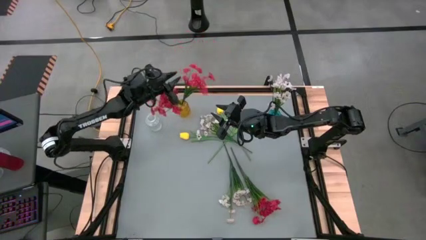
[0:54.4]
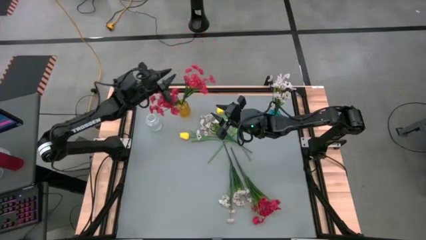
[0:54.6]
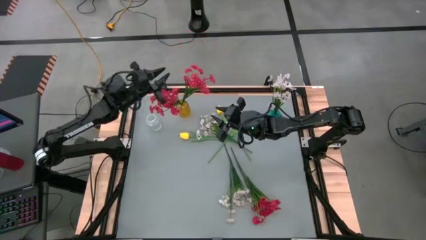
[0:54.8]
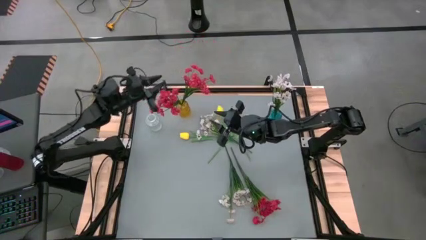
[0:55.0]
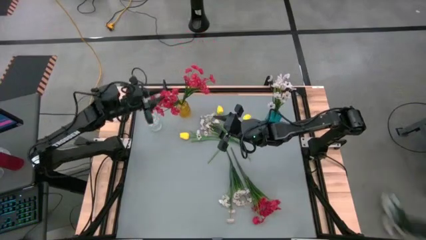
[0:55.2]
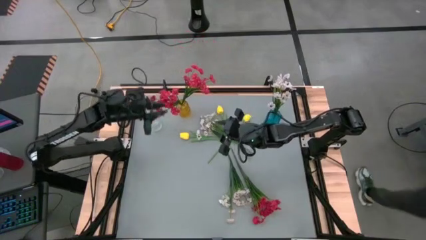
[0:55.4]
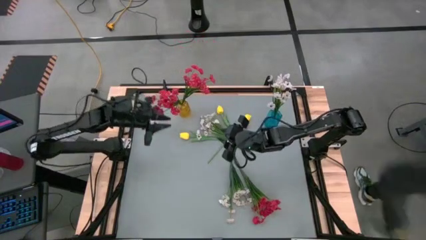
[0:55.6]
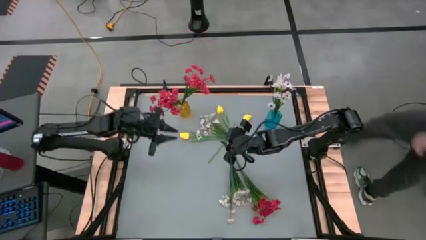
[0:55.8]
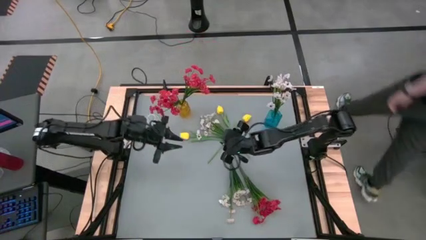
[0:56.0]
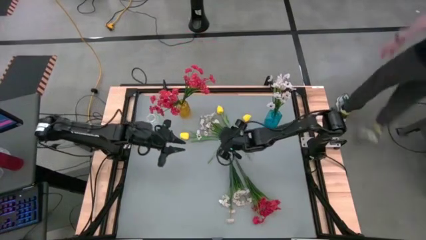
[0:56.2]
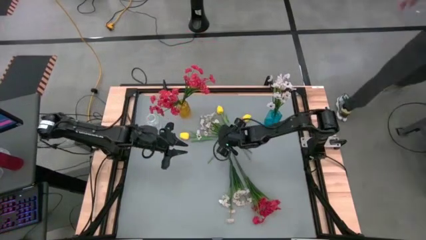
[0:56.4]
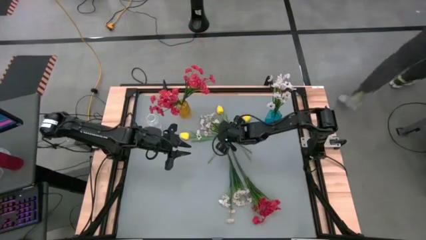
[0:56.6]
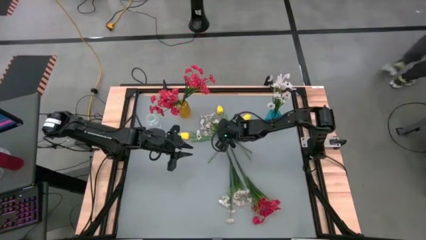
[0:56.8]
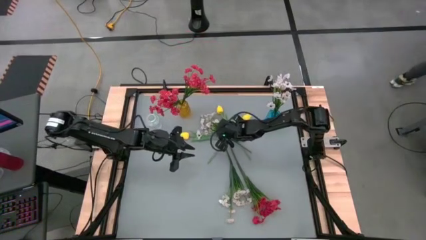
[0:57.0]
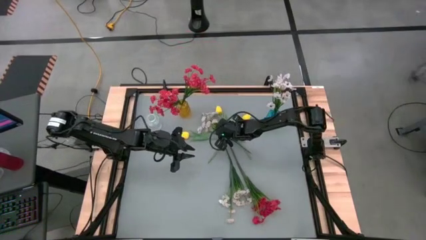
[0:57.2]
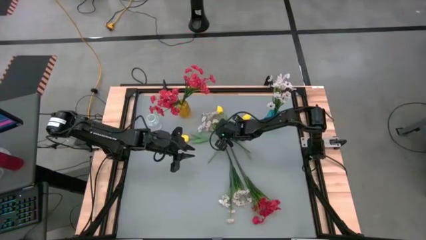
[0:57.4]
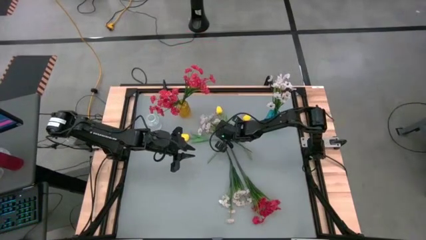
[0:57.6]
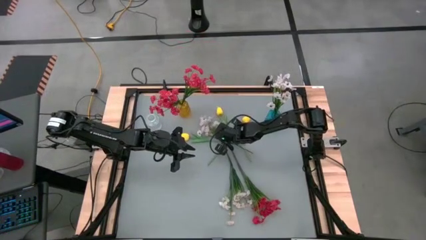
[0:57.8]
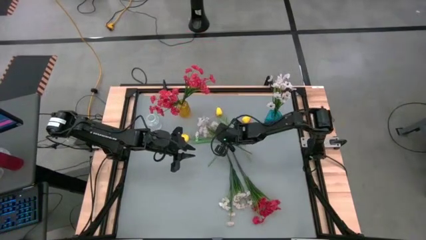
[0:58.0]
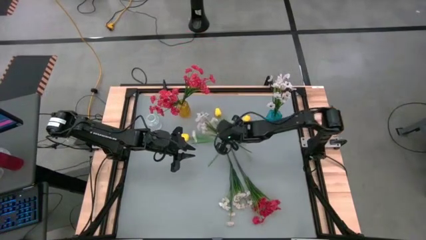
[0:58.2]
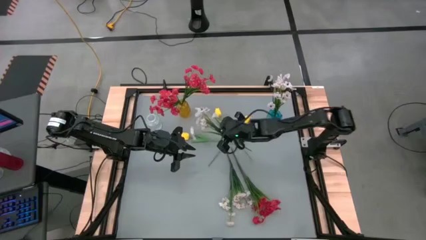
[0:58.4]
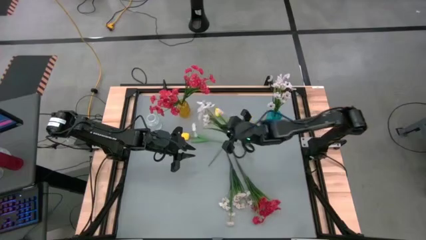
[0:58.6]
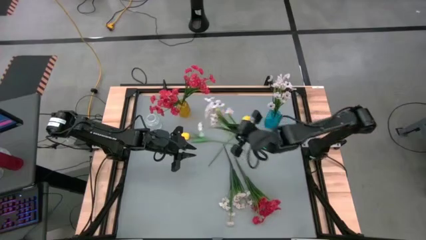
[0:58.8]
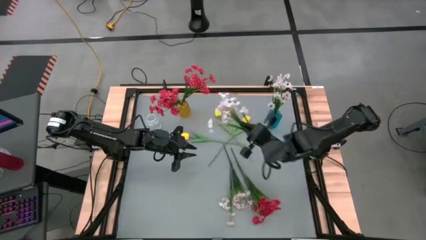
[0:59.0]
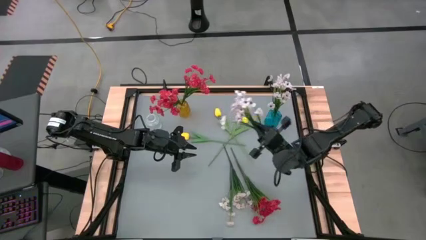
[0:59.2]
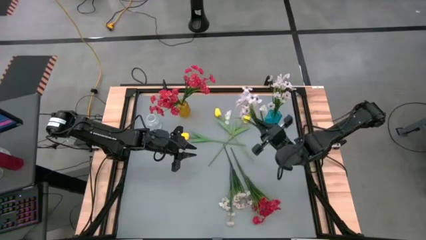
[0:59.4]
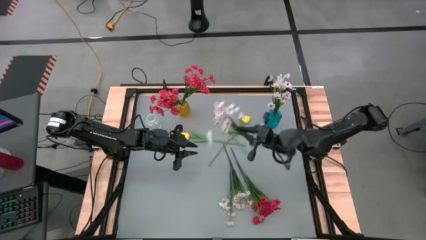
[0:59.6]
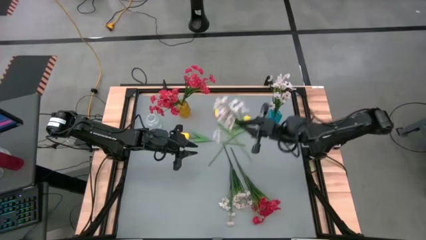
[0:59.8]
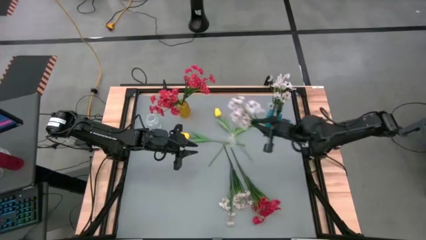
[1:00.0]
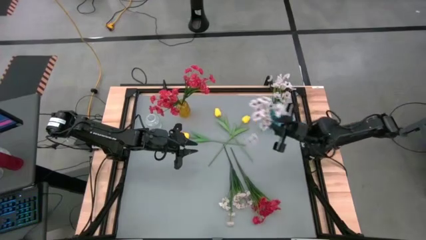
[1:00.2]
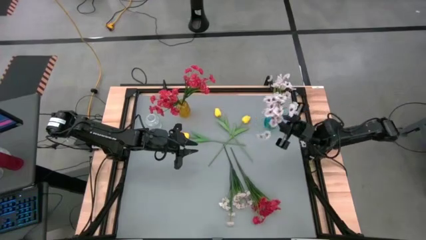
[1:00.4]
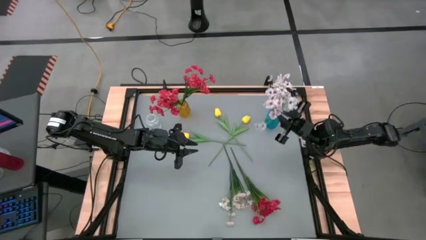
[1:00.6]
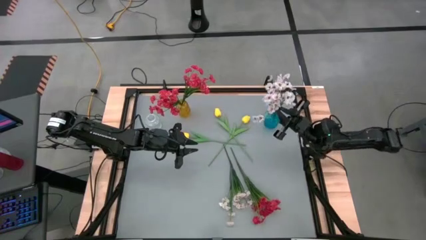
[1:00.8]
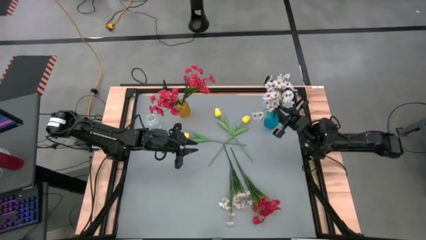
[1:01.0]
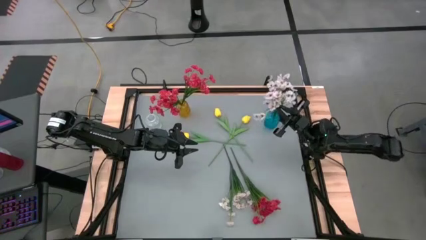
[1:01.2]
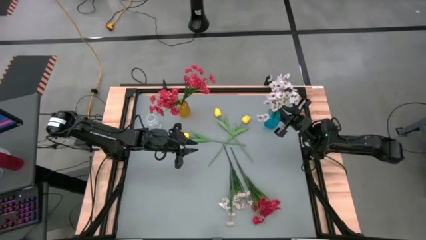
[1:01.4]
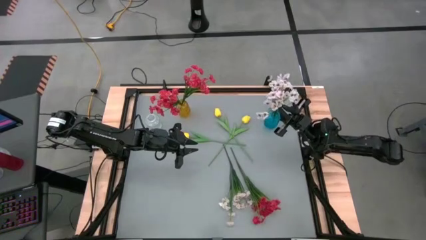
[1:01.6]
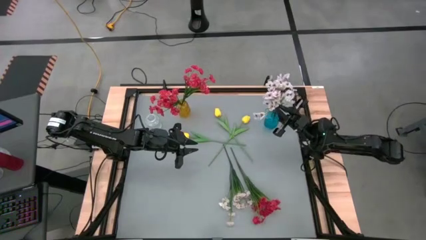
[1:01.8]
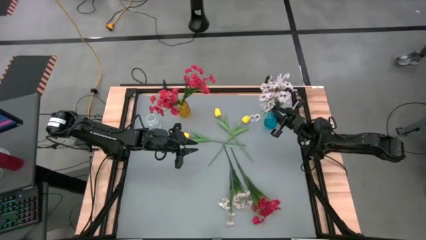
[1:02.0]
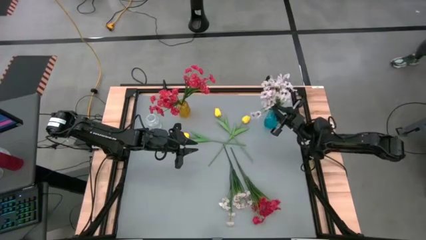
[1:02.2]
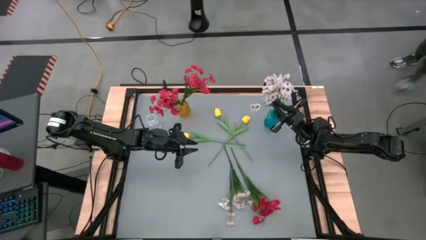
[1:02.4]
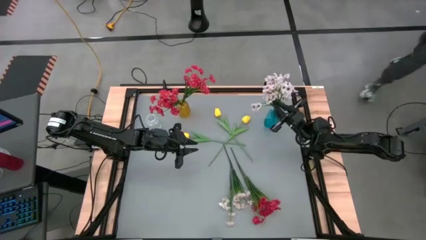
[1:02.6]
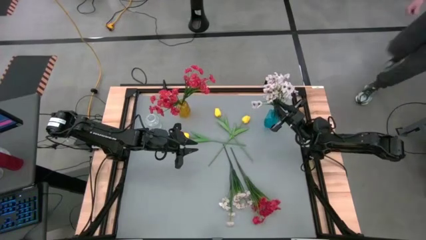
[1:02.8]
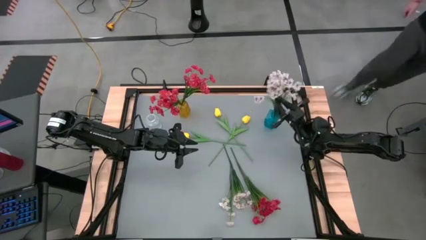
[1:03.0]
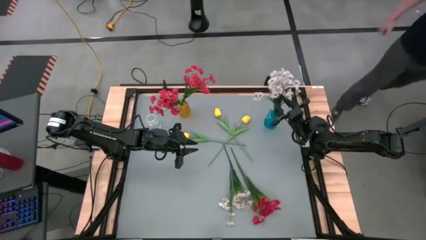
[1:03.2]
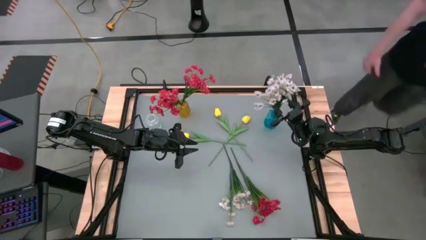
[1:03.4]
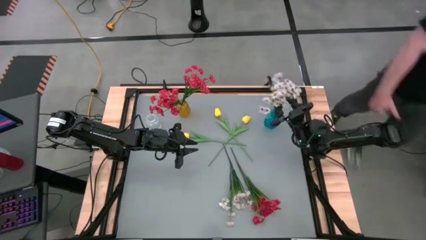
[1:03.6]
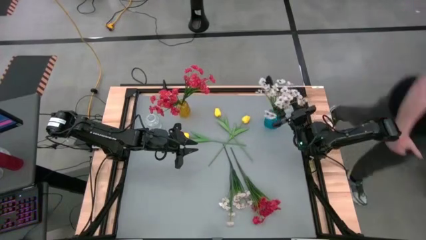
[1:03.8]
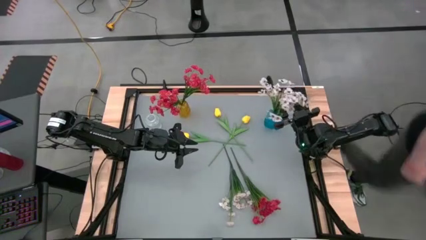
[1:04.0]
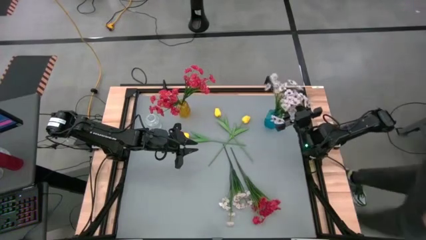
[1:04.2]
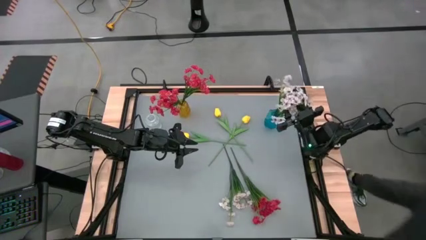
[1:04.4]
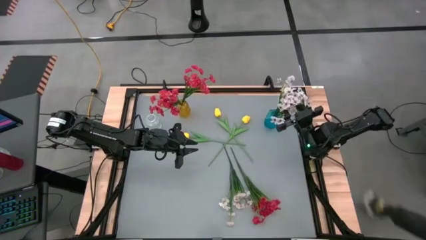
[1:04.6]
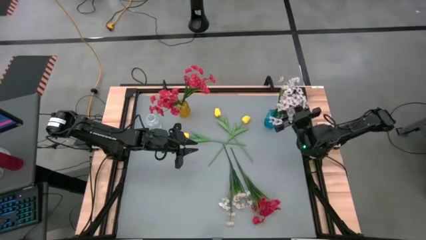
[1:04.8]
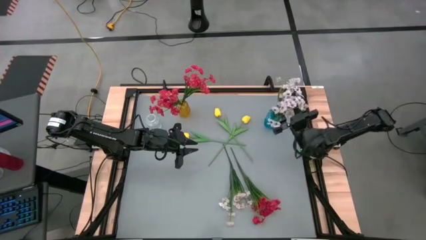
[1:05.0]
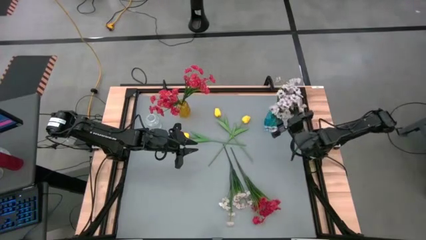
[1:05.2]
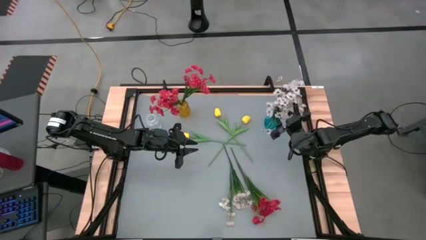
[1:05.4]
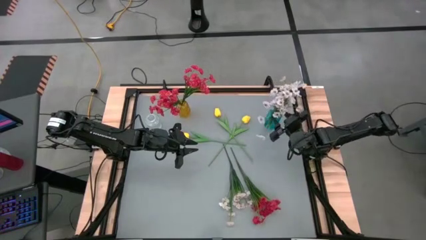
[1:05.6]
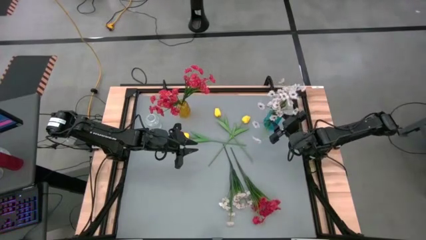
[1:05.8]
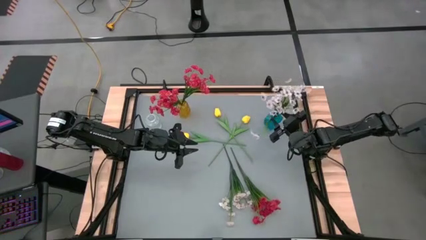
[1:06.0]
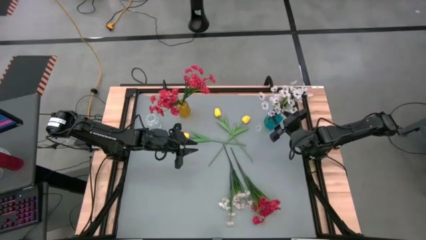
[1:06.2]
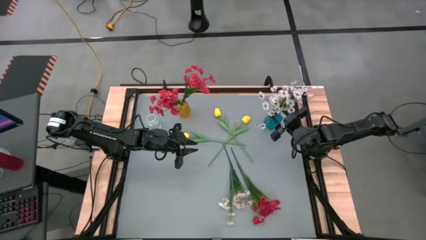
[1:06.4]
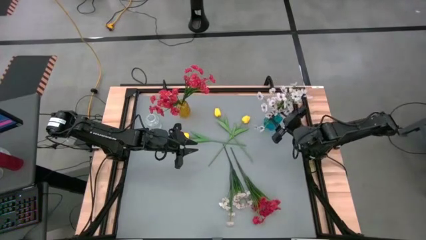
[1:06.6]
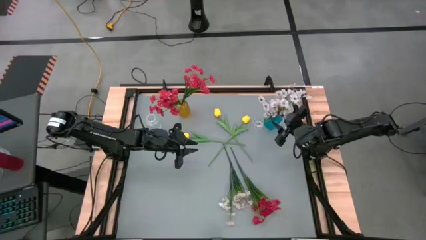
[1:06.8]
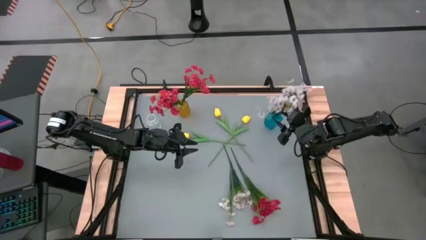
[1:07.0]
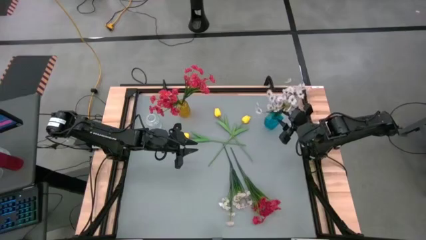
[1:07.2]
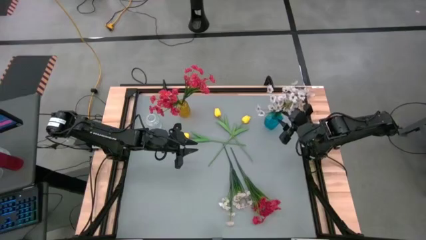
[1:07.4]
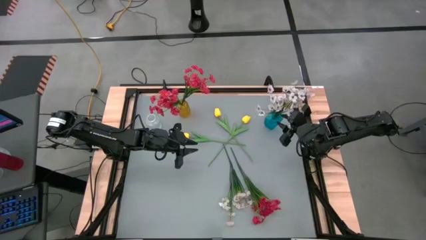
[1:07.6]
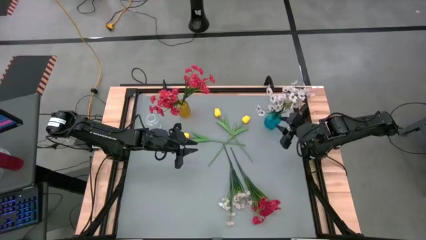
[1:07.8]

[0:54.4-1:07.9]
Task: Sort flowers into vase by color
Put the top white flowers into the blue vase

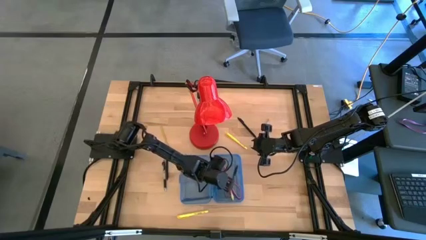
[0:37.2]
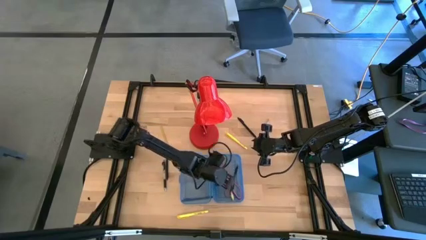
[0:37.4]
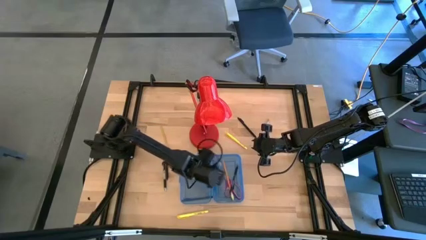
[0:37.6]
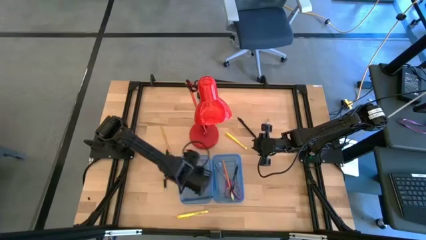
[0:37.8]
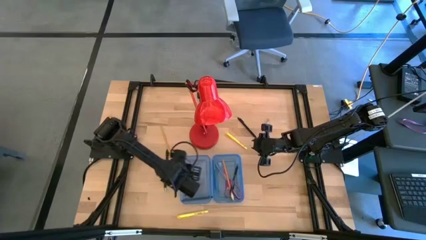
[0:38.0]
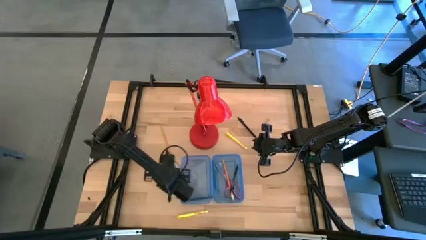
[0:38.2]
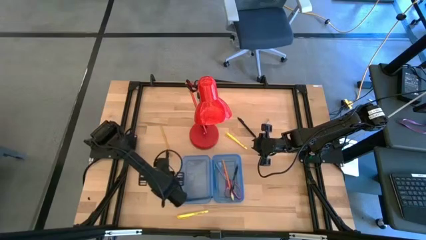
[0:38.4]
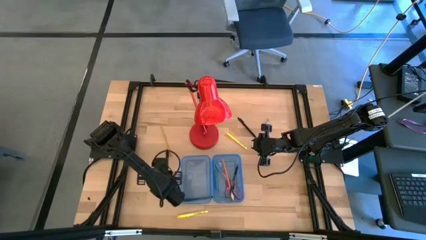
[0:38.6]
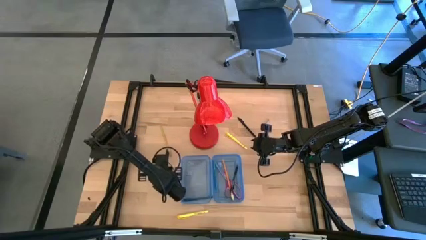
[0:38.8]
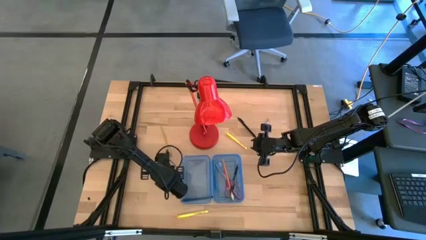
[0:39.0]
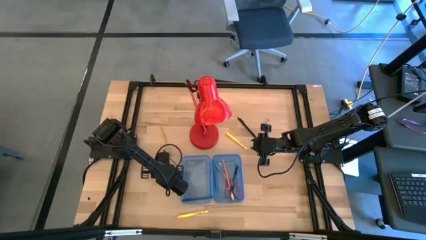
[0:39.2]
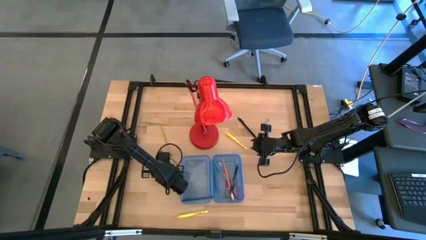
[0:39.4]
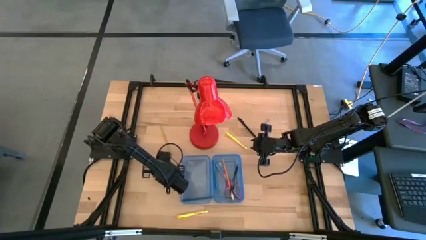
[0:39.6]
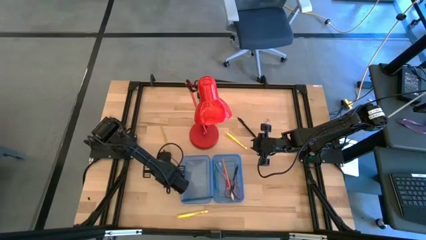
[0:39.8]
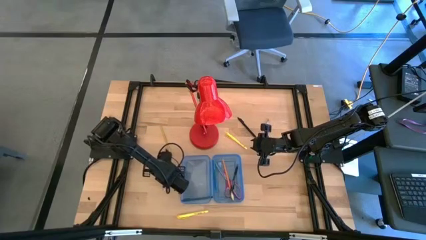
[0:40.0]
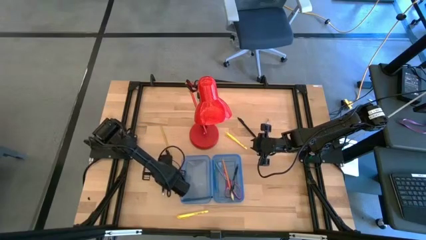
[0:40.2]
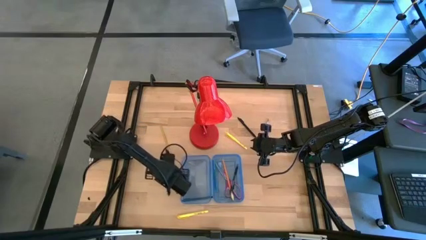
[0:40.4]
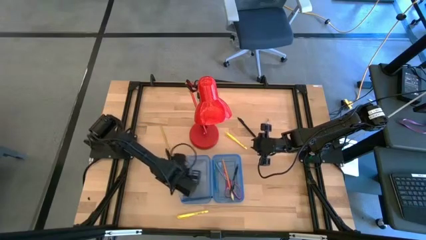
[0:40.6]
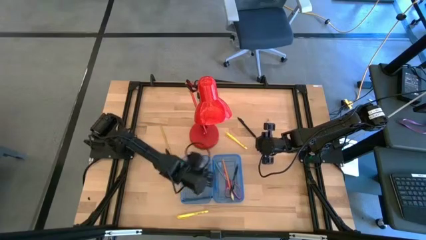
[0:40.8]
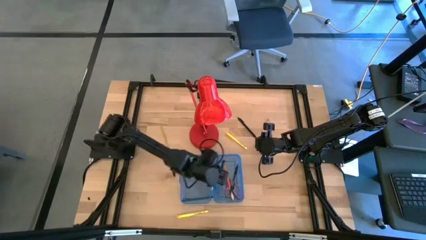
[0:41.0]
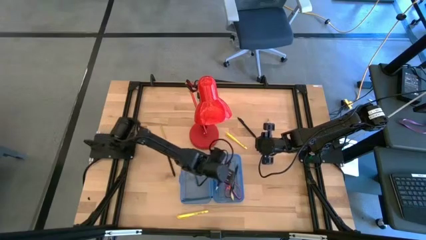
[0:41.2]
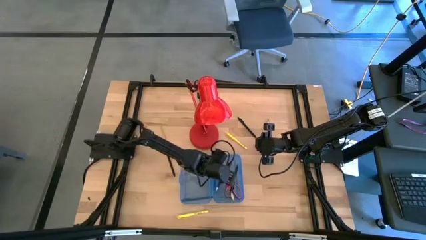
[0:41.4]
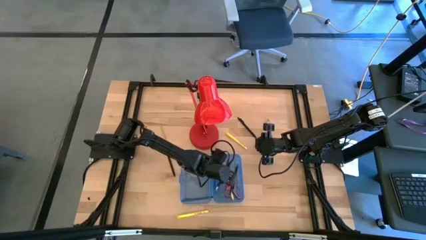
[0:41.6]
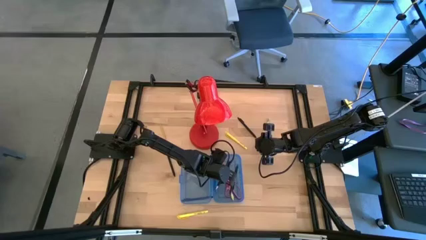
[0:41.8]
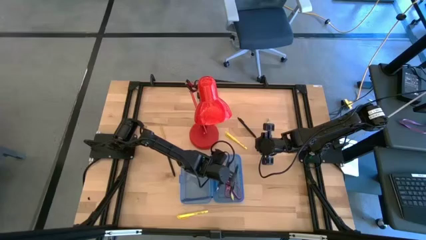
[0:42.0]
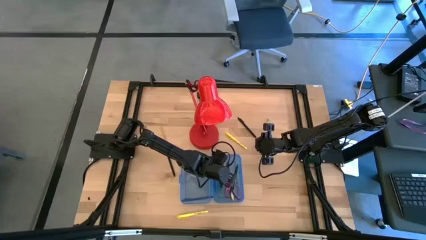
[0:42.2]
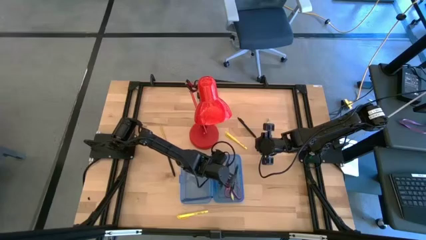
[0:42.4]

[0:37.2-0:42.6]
Task: Pick & place school supplies into a supply box
Put the black pen into the blue supply box
